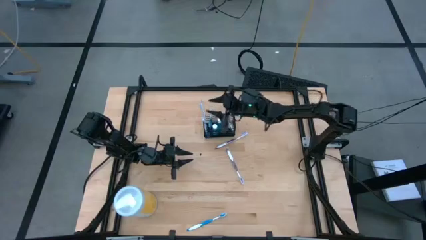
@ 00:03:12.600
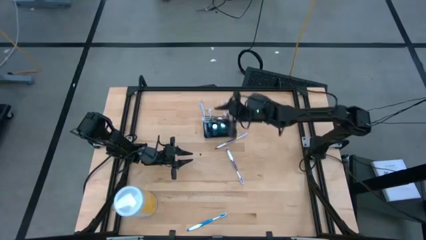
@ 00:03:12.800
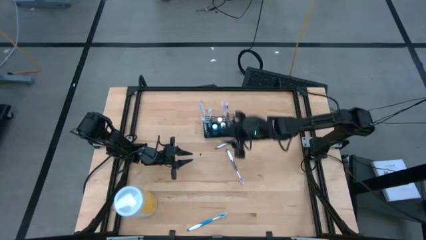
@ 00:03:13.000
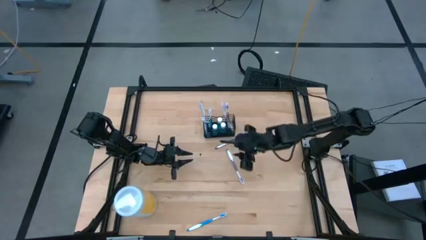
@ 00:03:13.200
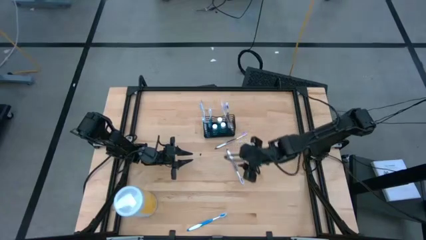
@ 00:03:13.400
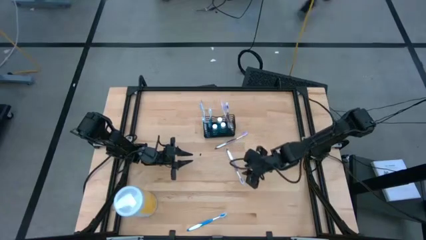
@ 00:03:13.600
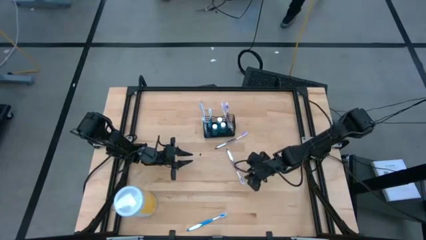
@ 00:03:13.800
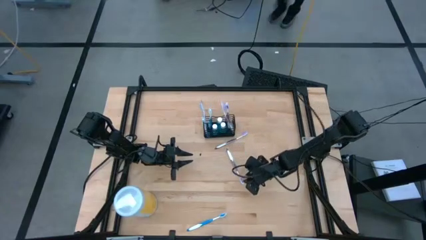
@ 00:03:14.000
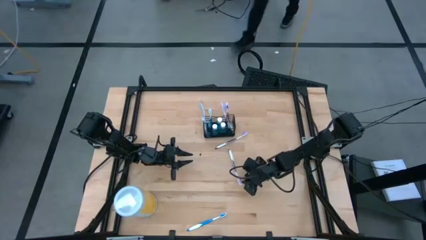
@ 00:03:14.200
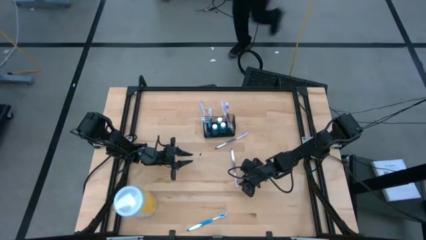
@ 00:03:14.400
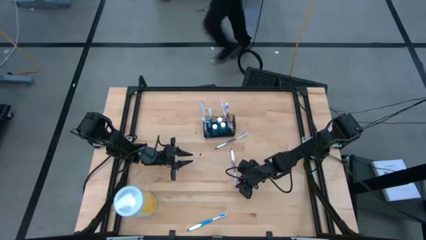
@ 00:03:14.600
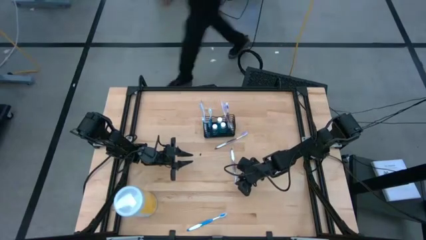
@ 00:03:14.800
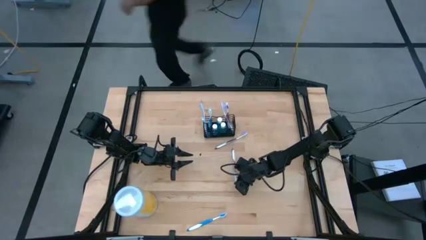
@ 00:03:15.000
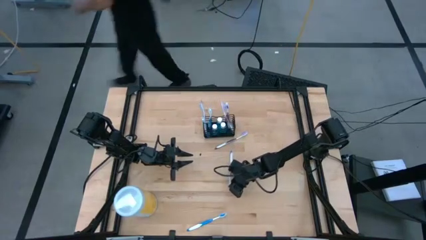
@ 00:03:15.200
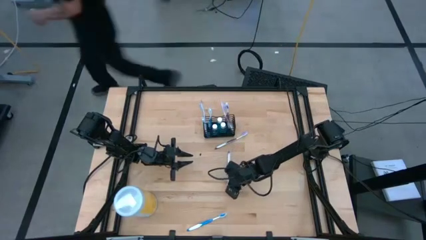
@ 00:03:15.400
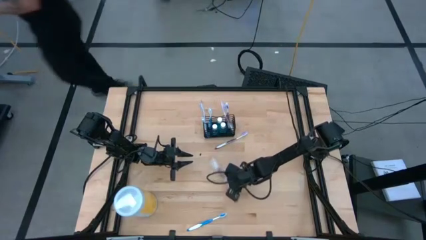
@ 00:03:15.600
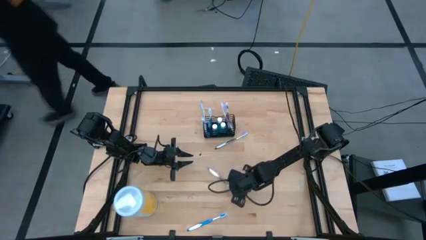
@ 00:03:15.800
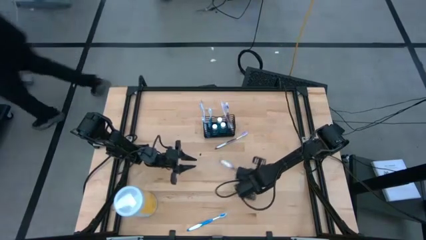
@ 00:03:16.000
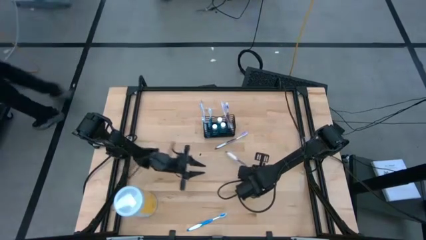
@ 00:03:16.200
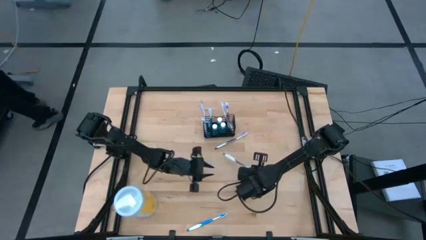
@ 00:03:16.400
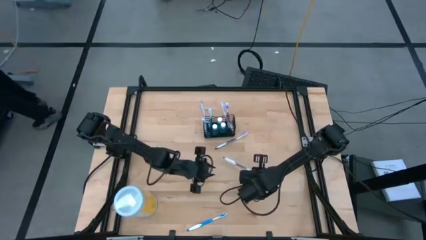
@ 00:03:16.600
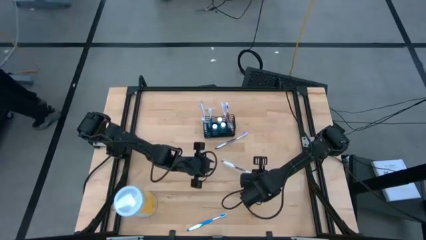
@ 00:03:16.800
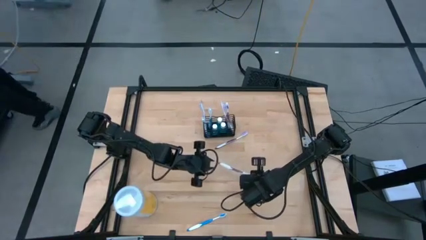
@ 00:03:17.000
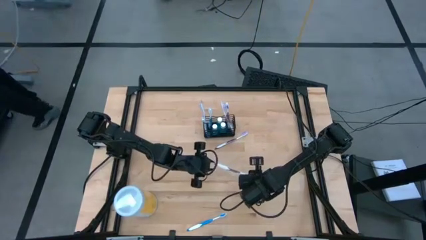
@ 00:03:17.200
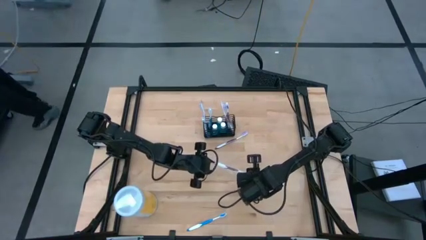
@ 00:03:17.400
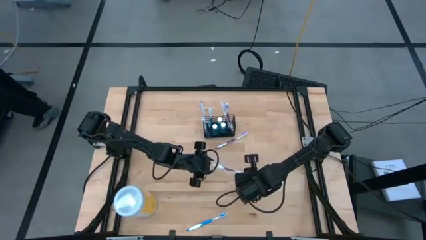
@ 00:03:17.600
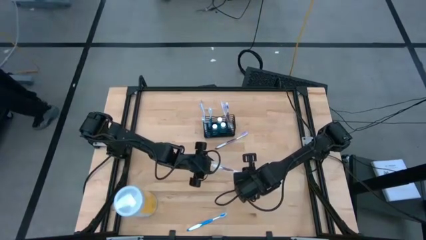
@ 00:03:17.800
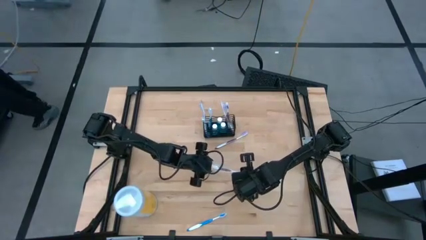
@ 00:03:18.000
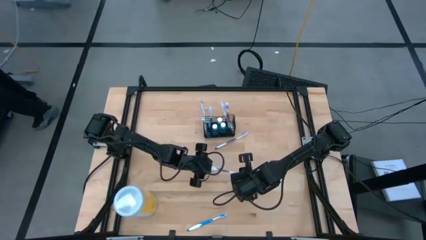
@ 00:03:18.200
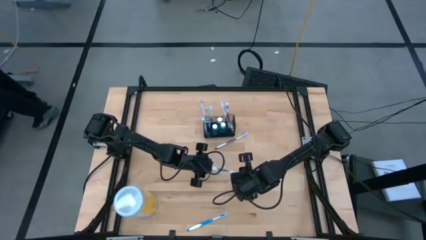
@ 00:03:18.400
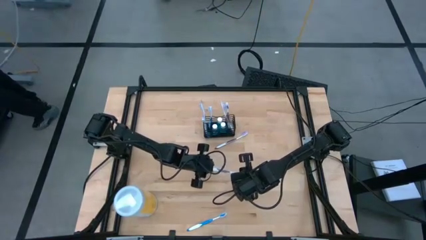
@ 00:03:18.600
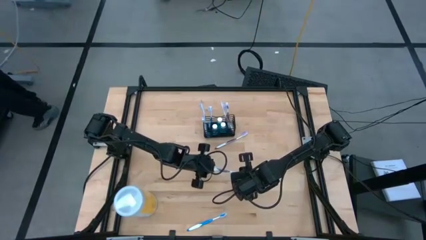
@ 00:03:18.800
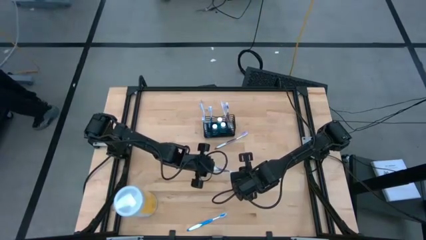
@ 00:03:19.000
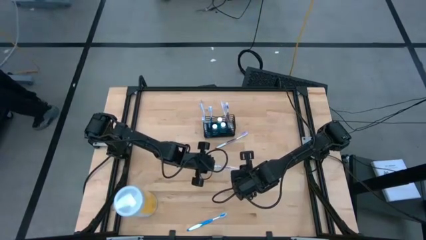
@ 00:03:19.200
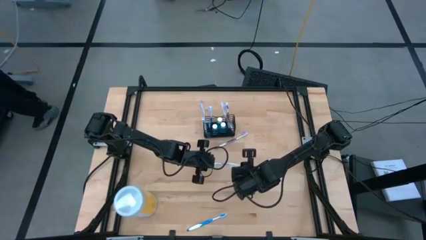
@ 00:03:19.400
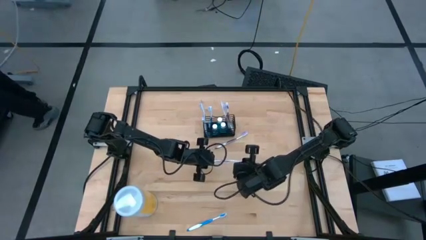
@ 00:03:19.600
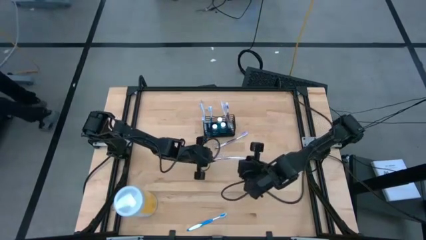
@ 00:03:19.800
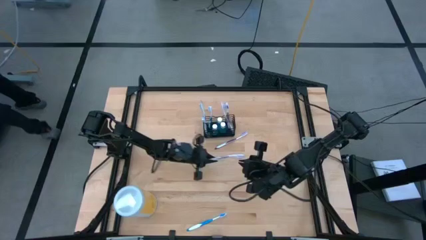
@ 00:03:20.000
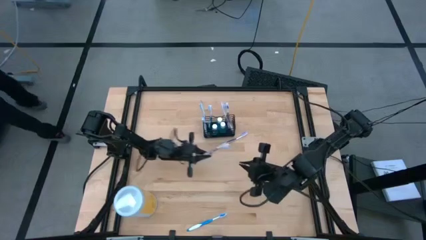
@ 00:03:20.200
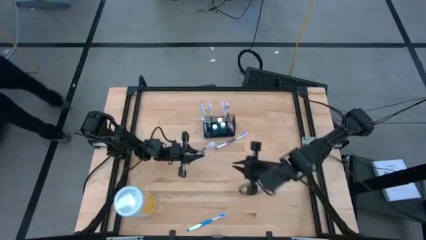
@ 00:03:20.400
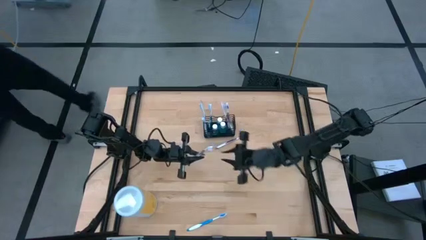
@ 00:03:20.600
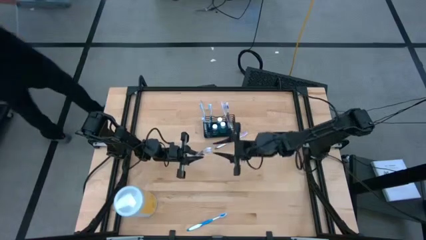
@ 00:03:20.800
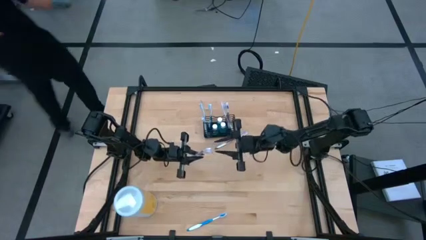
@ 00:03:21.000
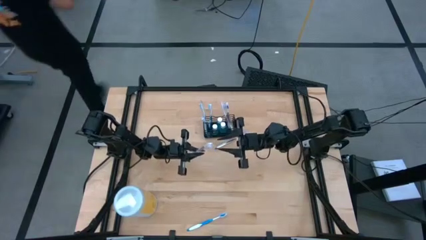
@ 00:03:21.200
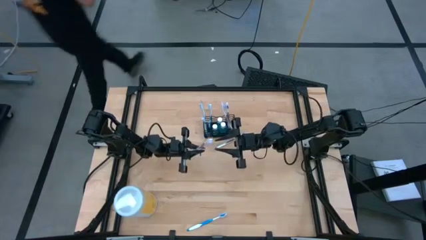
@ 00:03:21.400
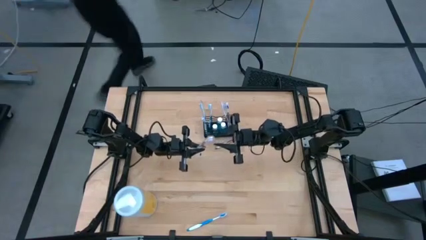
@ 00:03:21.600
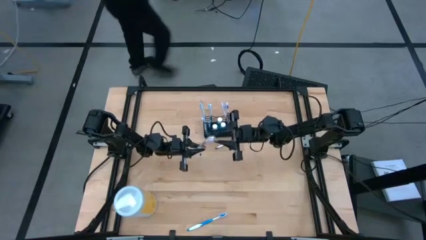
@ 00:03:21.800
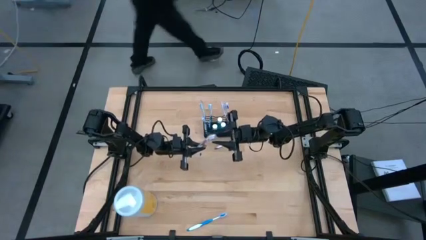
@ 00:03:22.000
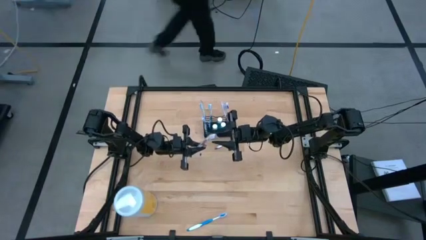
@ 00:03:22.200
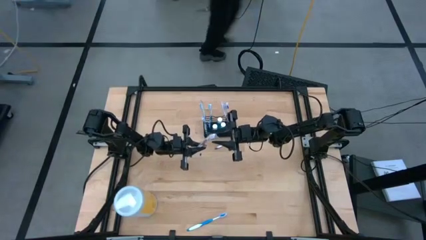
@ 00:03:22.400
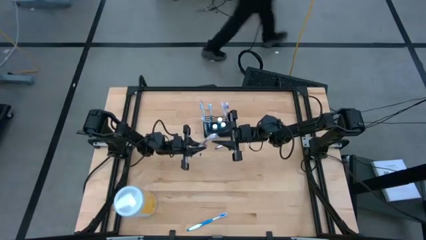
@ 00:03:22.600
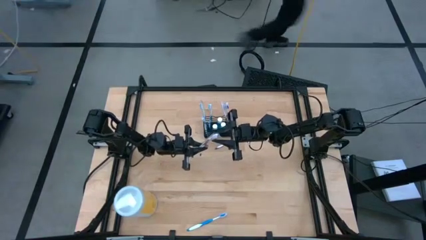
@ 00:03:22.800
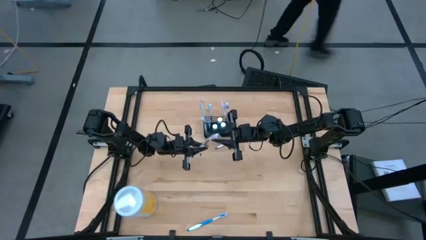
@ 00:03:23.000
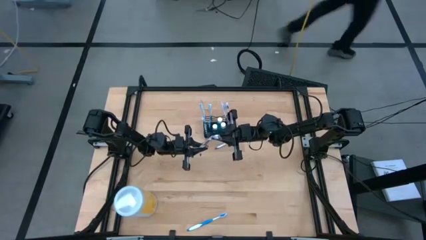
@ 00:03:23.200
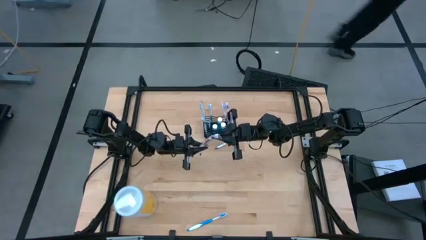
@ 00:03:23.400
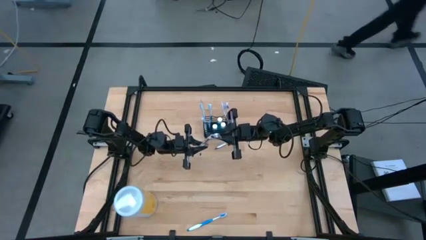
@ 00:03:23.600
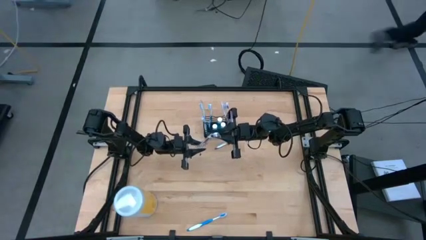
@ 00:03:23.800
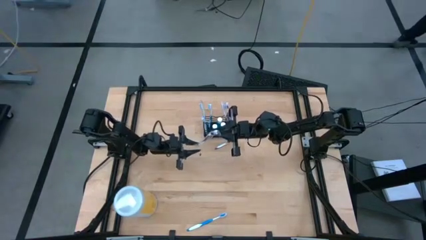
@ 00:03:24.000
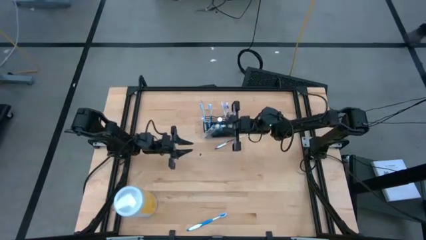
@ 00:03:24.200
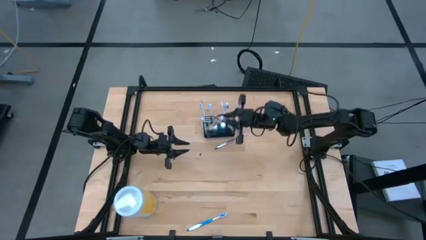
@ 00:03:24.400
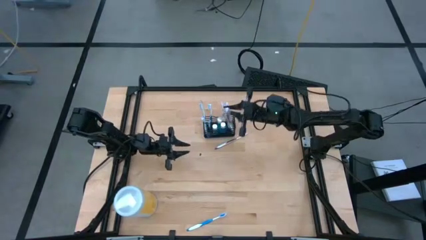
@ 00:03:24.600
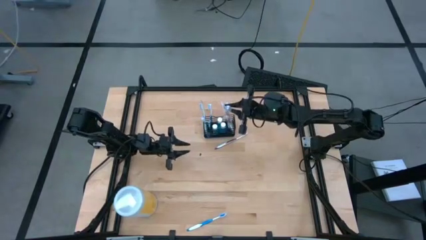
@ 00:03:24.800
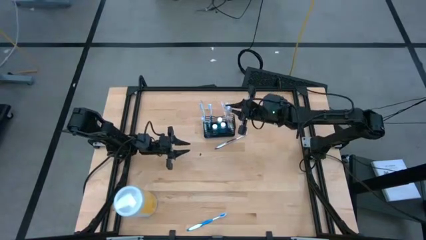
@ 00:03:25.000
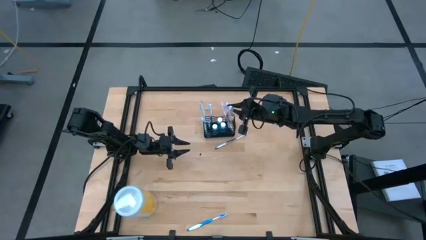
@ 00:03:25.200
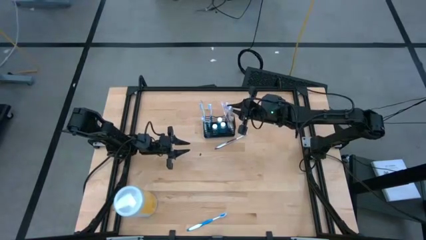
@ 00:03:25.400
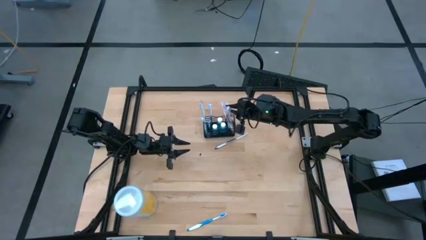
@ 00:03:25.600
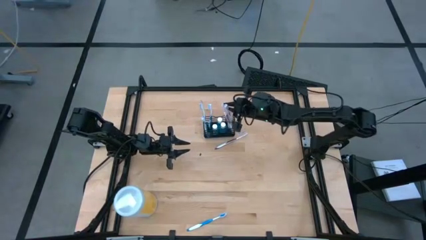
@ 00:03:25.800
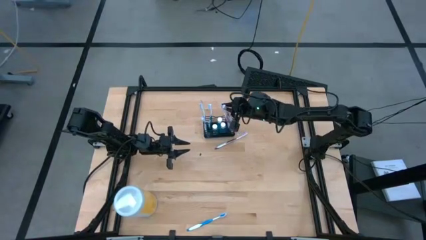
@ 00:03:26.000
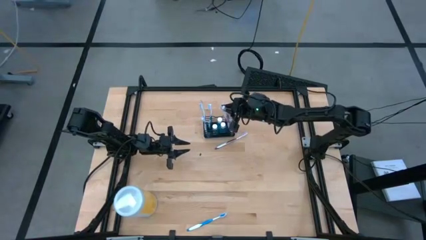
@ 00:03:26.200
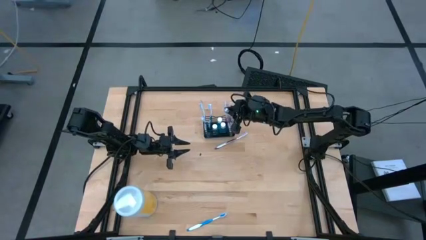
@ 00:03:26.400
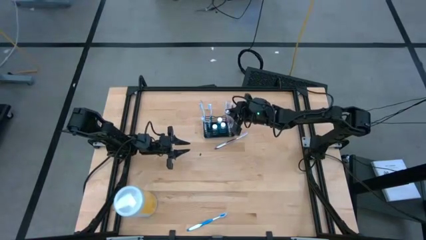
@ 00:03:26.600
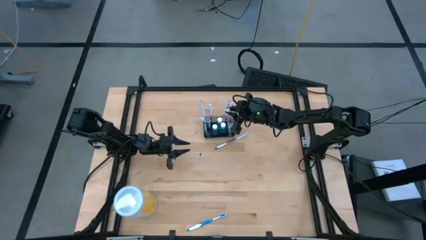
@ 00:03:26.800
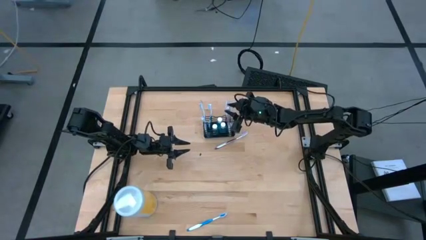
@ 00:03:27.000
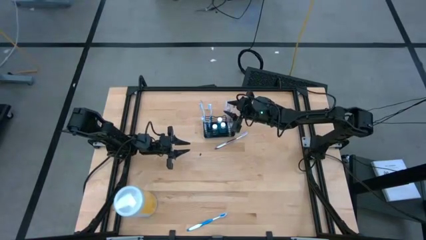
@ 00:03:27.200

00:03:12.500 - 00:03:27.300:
Task: Pick & Place toothbrushing station
Put the purple toothbrush into the black organizer
